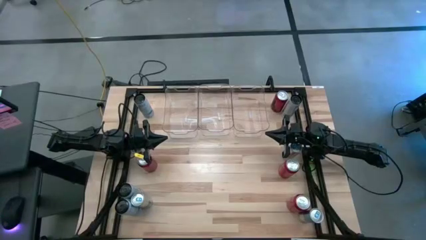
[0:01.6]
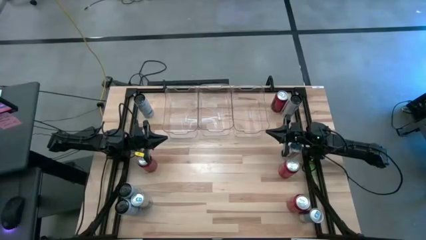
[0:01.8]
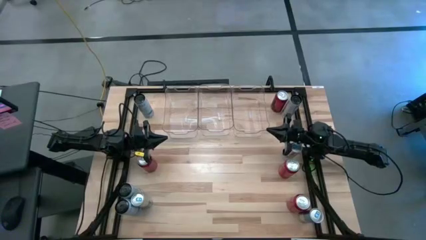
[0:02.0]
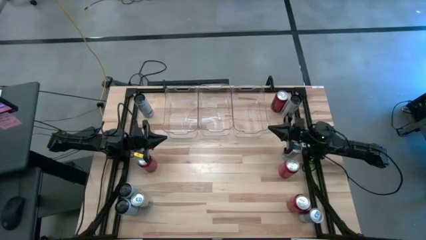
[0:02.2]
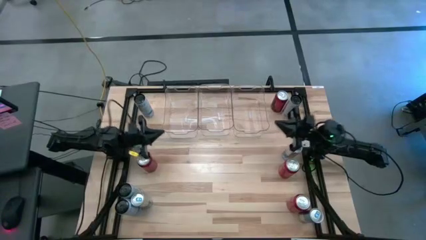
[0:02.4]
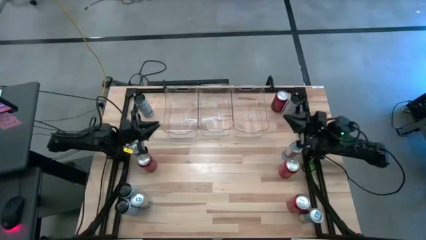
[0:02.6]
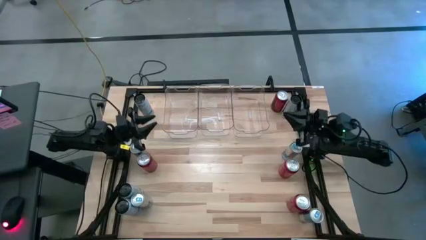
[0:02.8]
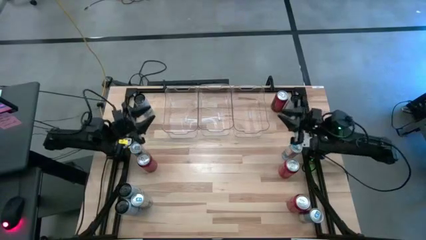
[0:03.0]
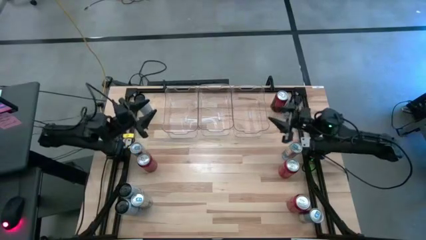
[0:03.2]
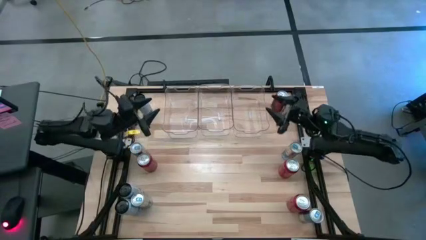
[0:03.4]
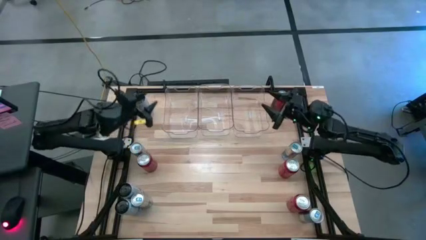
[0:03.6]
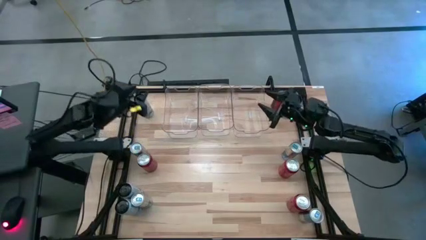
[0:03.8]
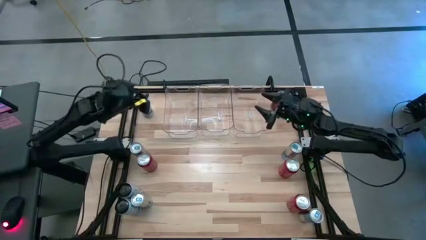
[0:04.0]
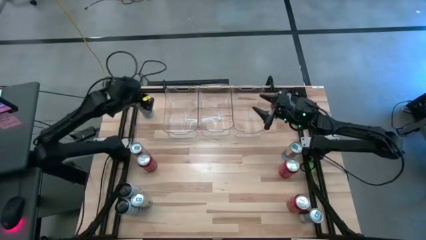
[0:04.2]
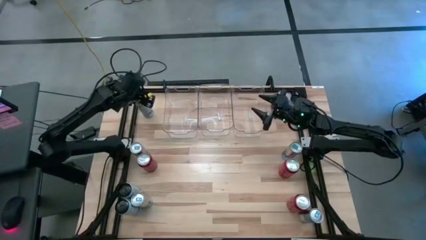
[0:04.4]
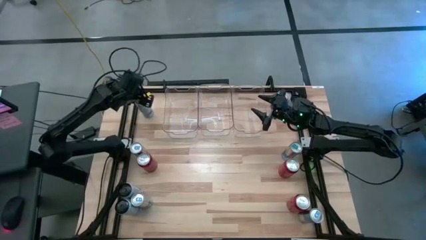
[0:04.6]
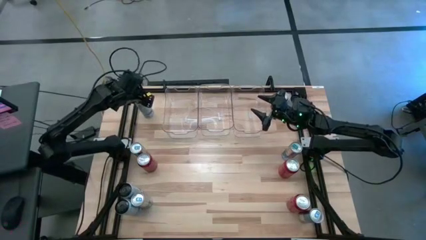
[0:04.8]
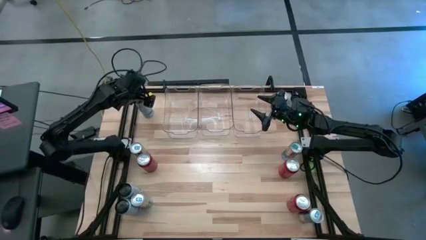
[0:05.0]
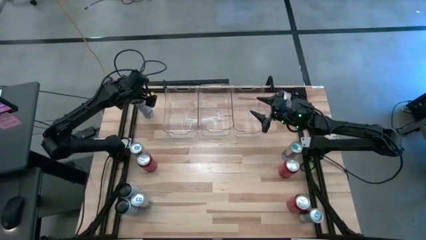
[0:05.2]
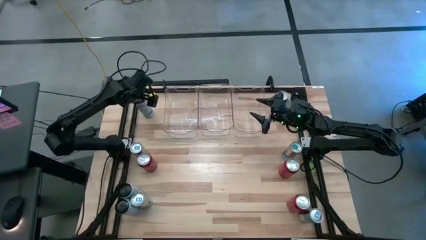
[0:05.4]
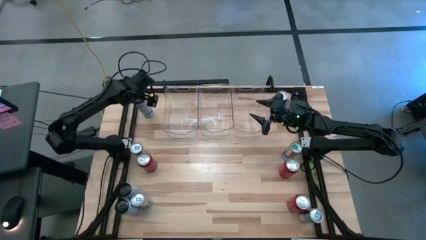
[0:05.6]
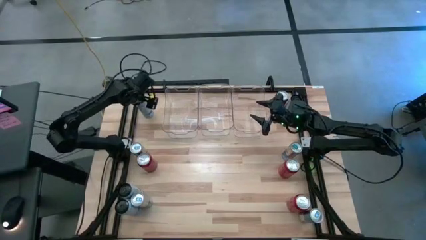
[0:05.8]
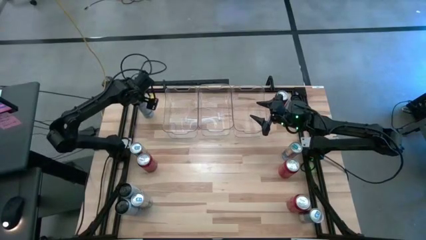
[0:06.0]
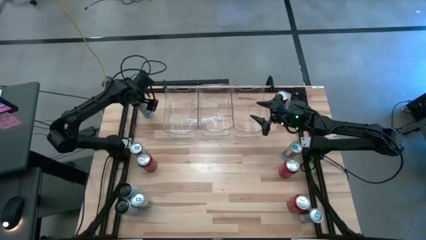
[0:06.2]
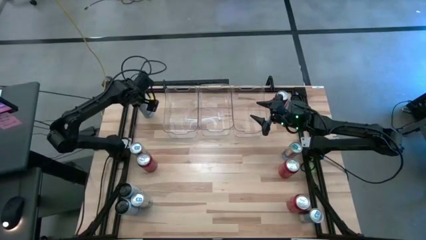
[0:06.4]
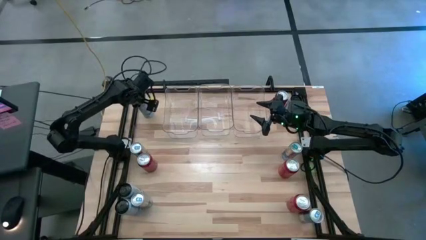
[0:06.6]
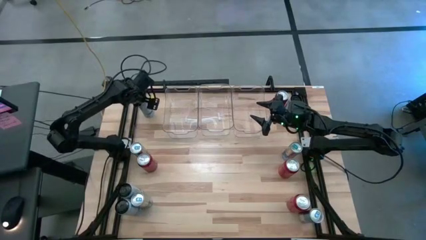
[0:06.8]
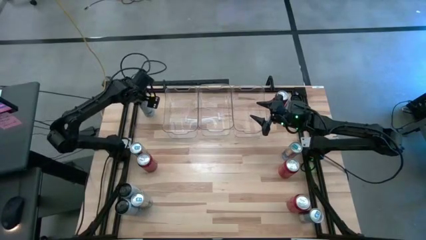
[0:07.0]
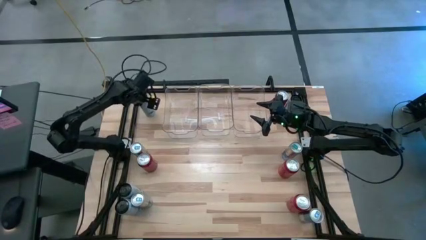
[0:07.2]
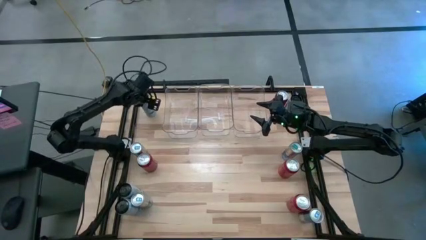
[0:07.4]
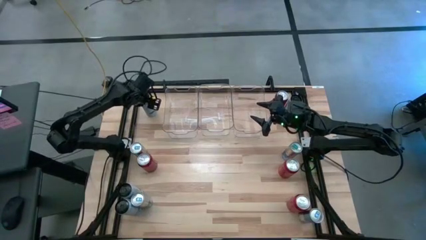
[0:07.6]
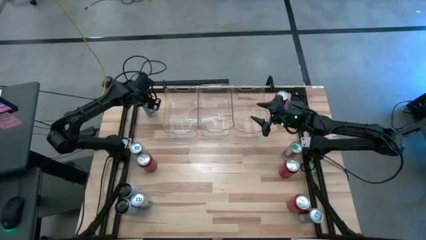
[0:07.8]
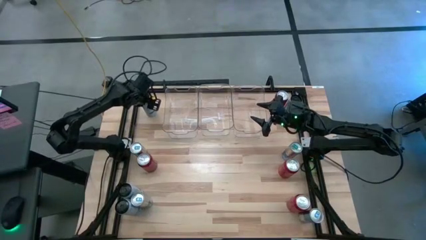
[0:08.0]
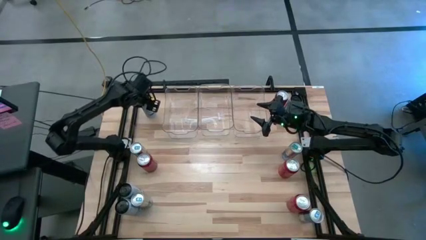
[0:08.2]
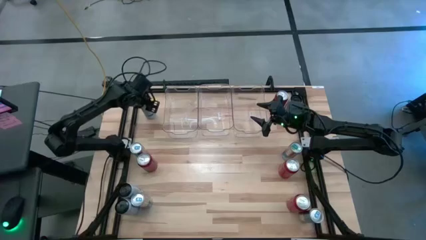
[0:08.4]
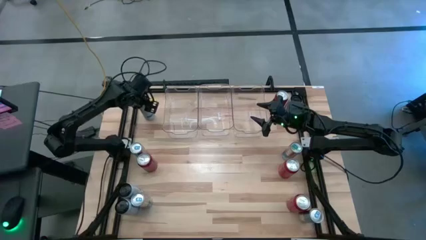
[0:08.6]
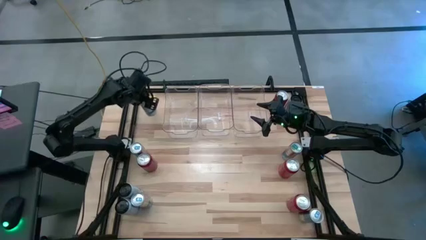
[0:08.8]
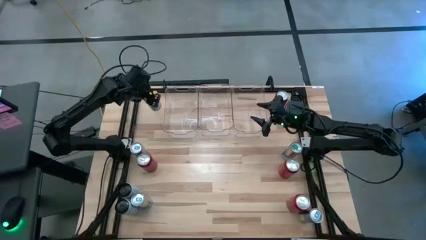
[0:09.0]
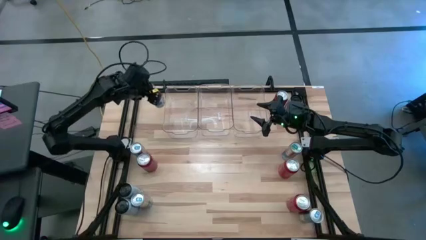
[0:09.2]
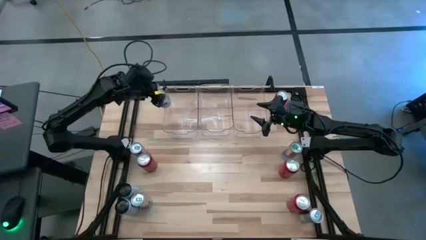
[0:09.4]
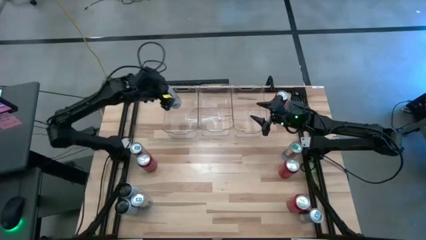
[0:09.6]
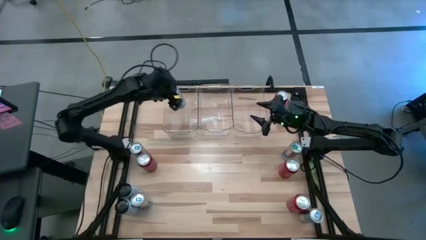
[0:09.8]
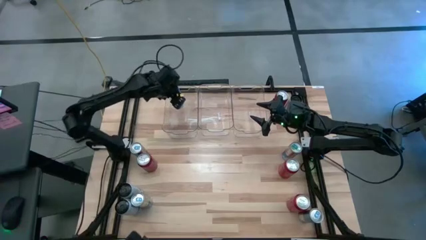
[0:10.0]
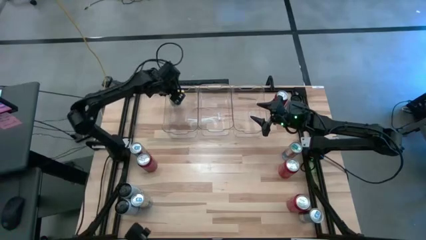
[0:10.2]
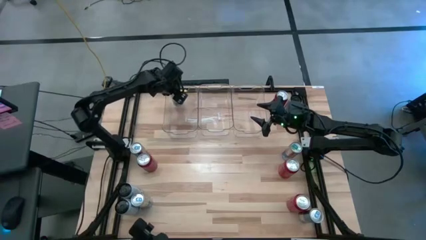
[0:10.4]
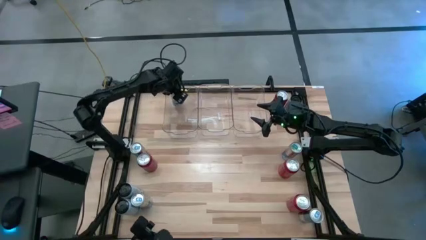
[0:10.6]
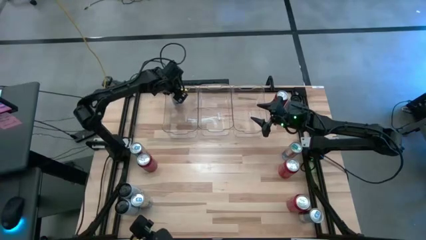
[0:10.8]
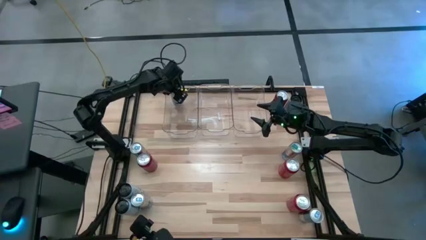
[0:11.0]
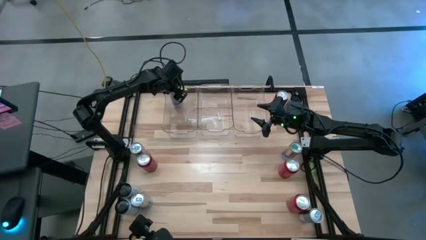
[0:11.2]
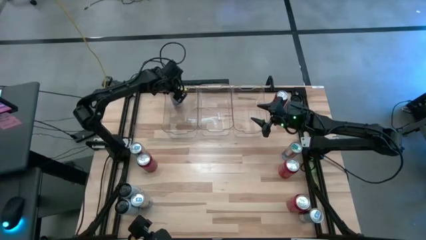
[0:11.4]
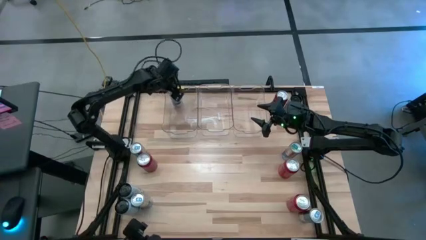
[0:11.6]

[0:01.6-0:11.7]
Task: Sort soda cans
Put the white-blue soda can into the left transparent bin
